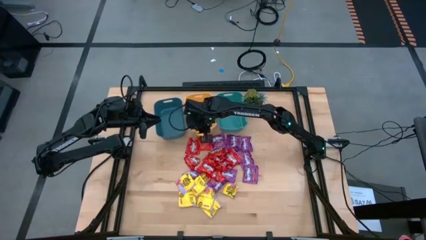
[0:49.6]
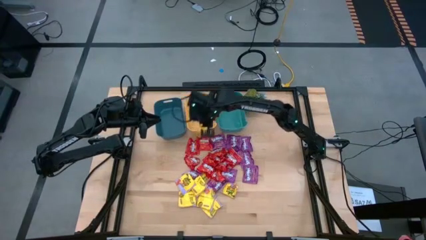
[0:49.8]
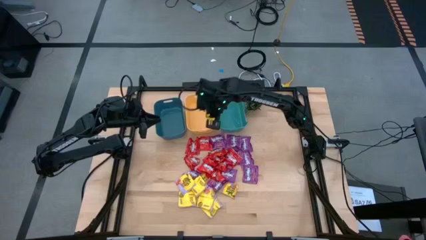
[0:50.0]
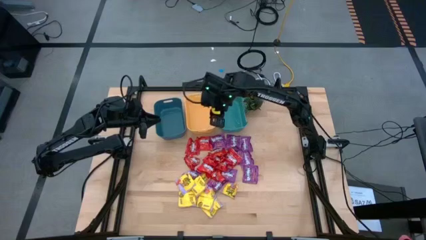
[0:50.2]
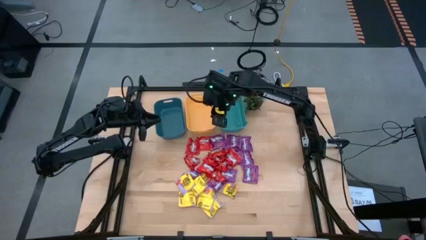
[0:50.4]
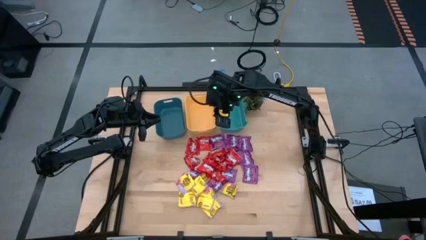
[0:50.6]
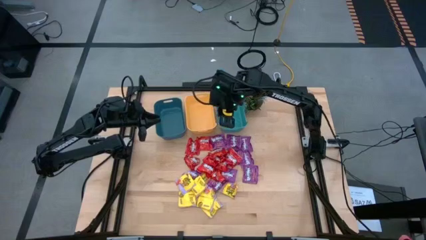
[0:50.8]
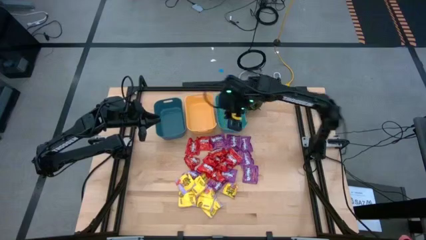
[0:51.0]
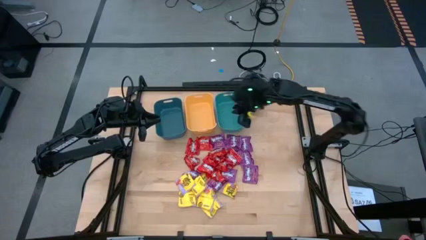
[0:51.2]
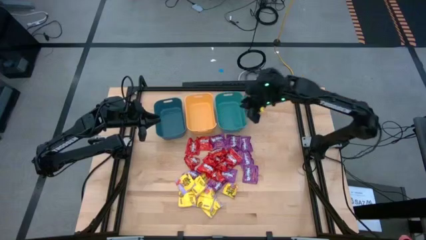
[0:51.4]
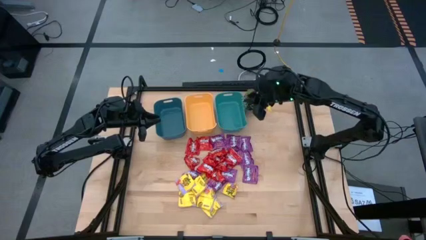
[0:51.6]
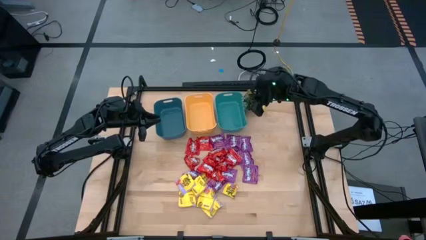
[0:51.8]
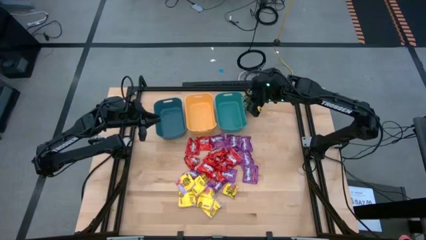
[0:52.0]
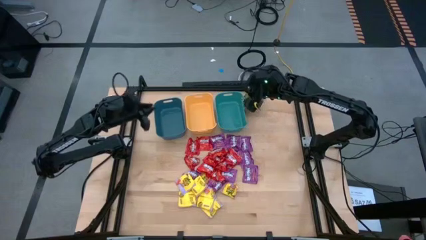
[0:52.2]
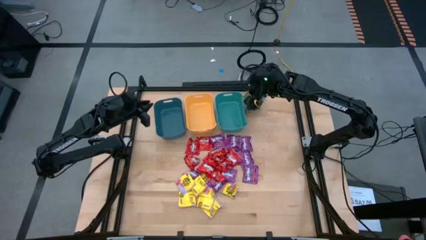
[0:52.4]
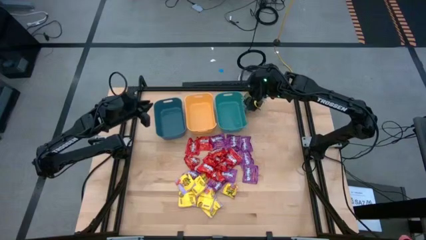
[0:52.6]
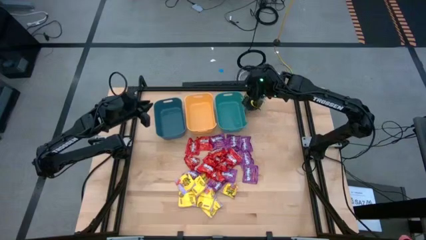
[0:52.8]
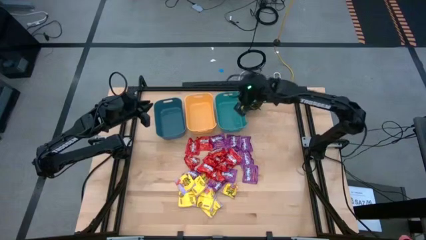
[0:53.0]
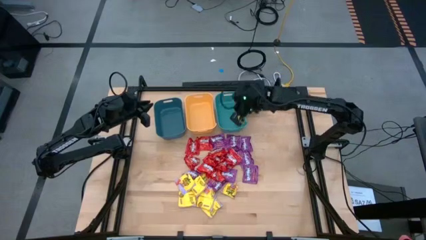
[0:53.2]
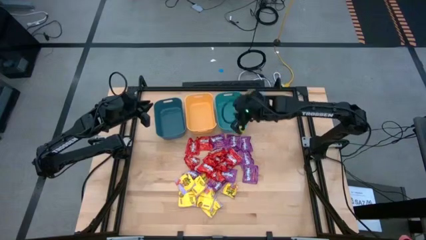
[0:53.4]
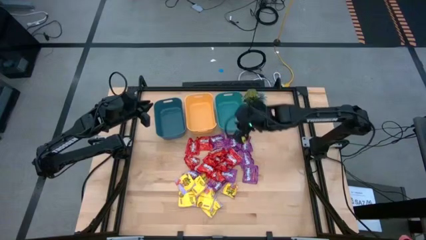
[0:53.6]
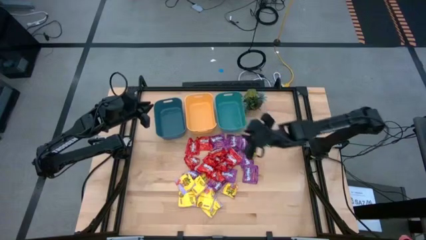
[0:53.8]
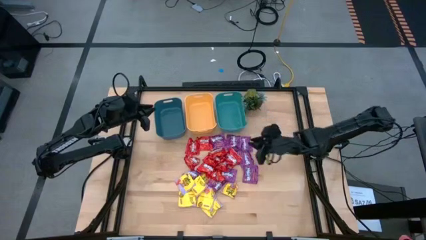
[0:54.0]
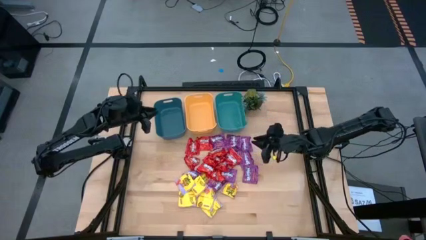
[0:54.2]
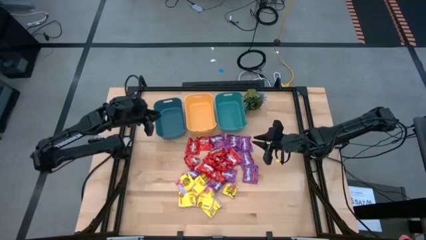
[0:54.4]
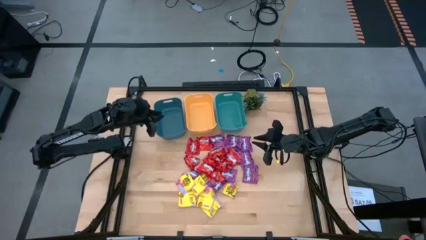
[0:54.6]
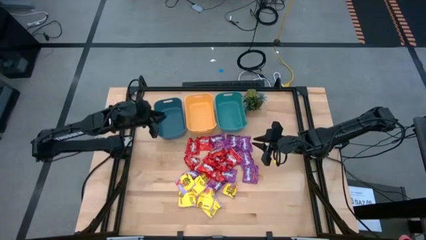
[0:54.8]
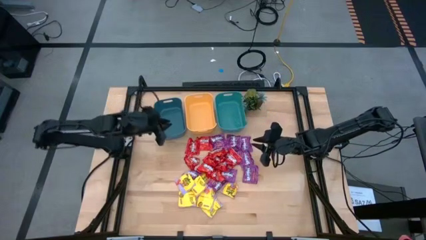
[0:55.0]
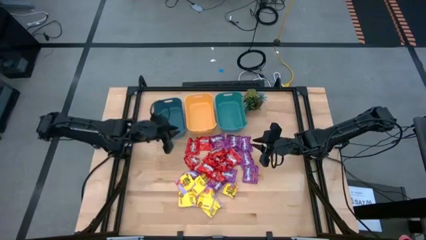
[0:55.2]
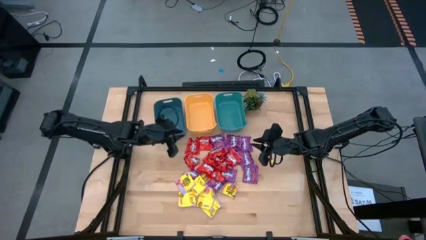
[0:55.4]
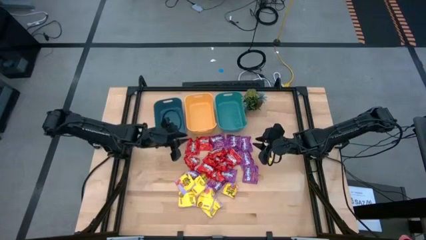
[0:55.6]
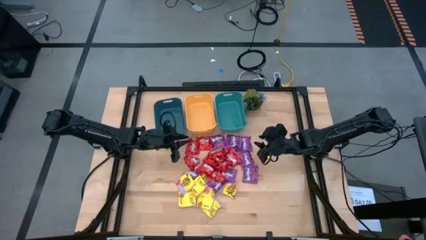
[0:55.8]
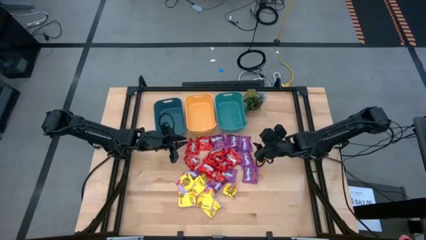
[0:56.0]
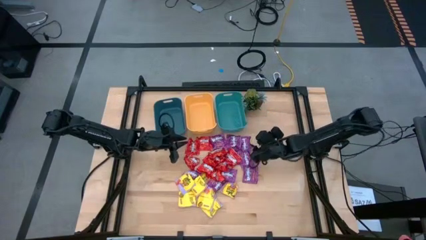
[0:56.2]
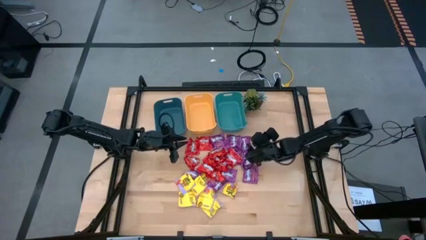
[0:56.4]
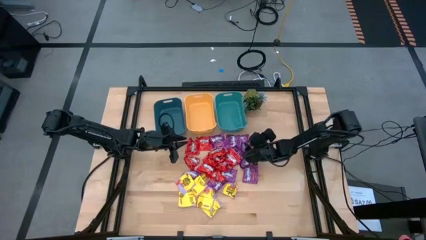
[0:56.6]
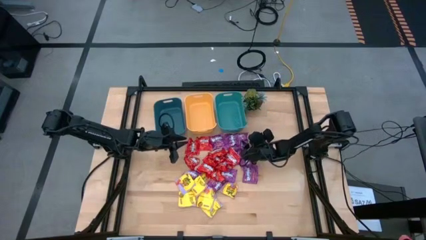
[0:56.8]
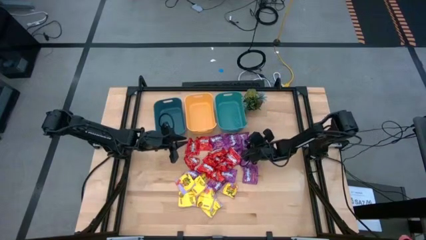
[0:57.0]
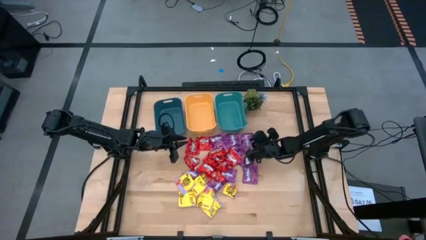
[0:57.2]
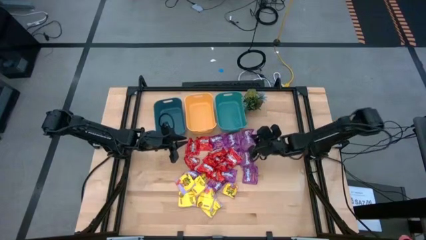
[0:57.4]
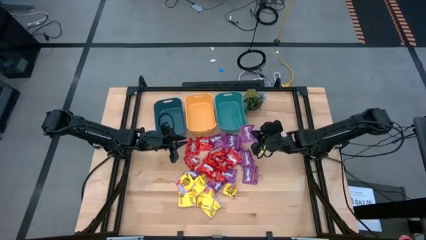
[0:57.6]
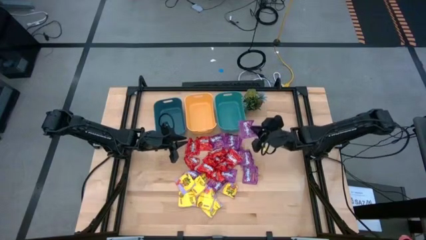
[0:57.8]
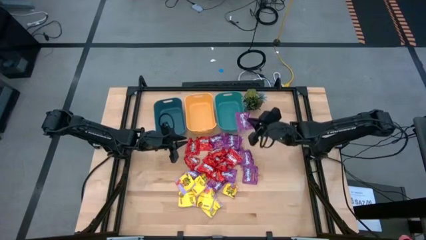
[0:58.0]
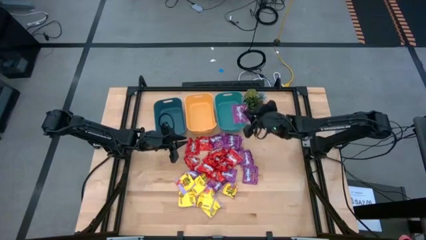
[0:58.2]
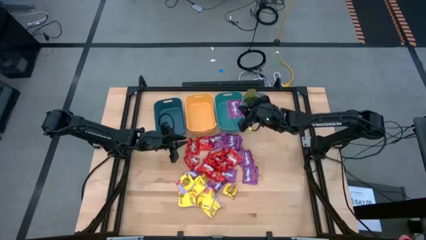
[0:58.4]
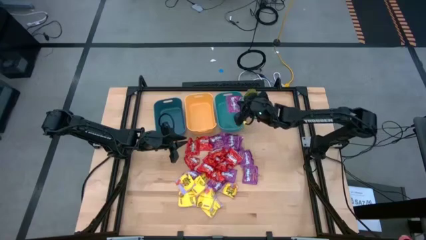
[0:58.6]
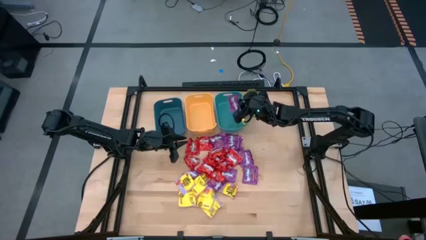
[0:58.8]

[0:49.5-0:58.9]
Task: Sort candy
Put the purple candy into the green bin

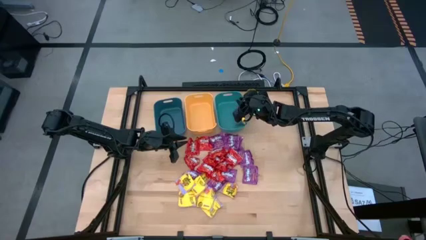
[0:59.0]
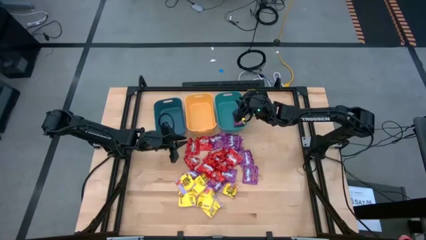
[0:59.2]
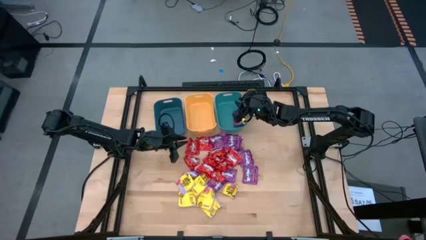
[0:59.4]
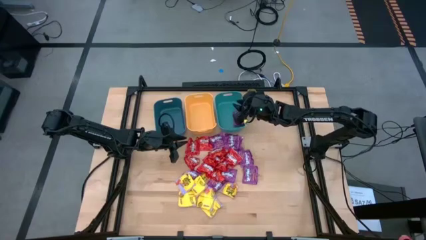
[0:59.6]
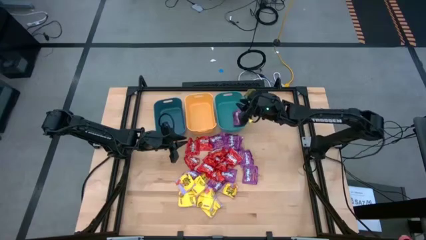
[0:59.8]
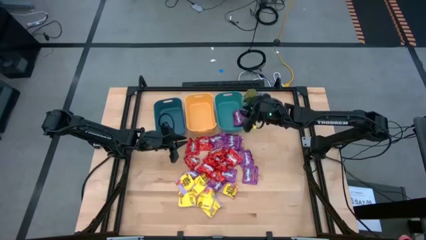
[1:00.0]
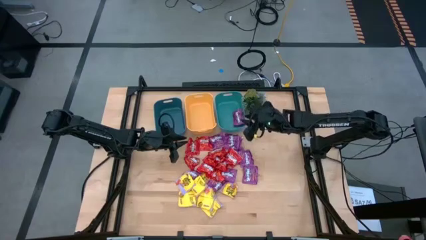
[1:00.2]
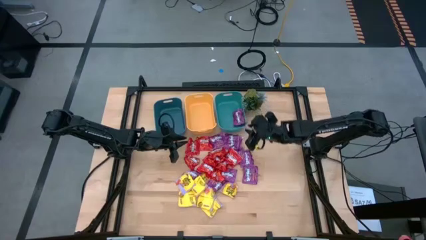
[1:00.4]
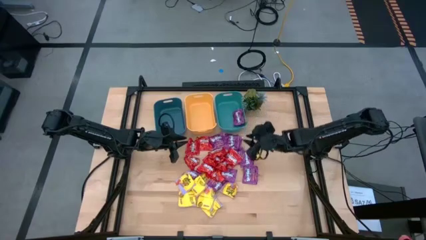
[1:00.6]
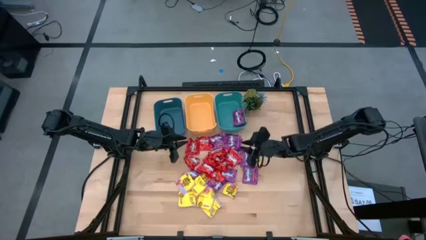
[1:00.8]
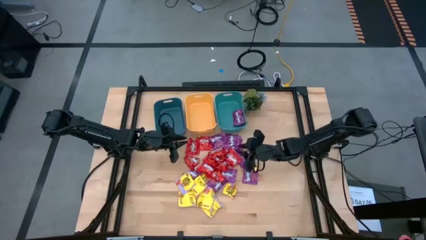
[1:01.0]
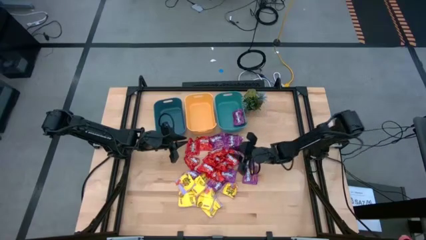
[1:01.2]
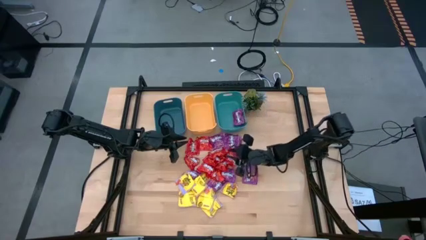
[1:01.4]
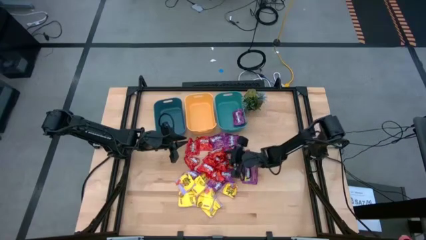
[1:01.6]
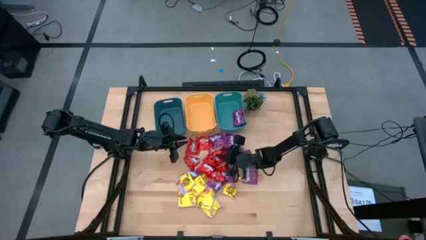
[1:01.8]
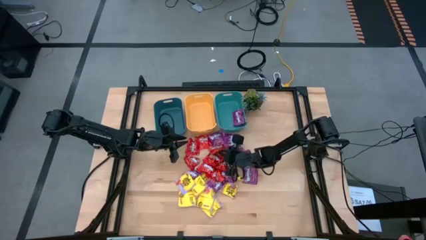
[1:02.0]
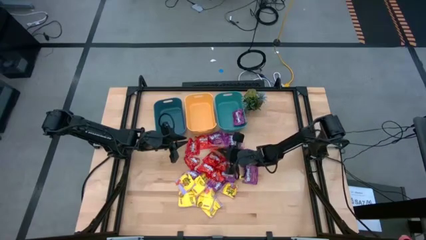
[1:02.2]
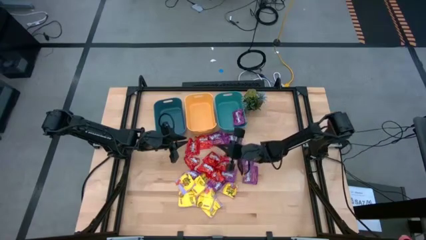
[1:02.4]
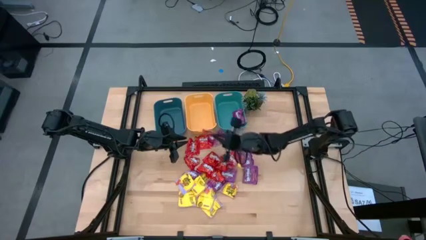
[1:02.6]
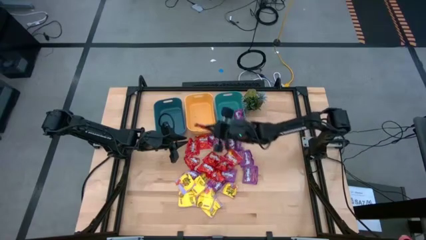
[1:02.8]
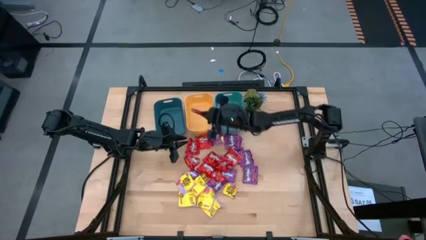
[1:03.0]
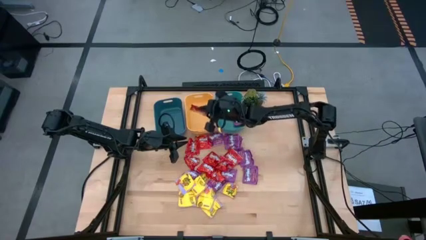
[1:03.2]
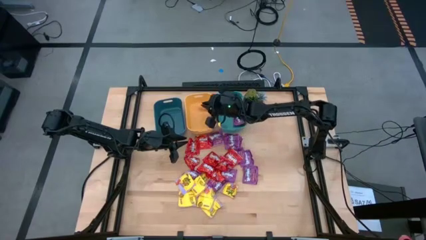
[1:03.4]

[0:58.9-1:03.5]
Put the red candy into the yellow bin
